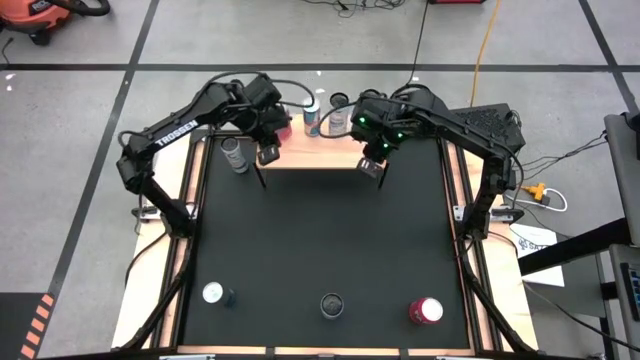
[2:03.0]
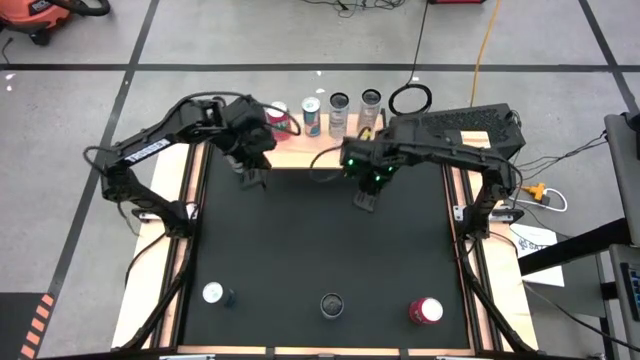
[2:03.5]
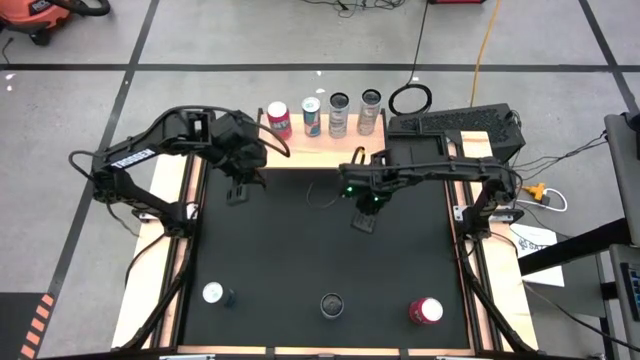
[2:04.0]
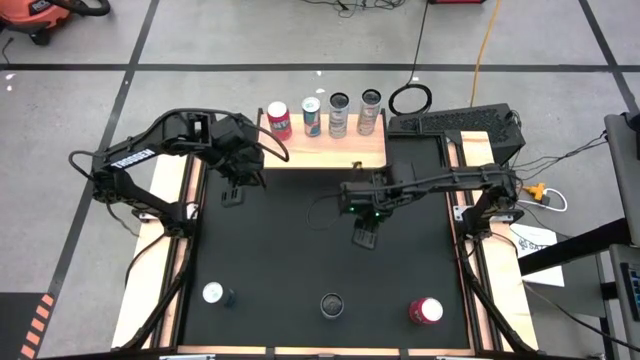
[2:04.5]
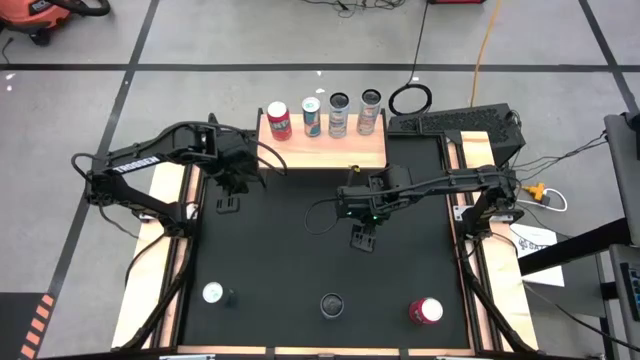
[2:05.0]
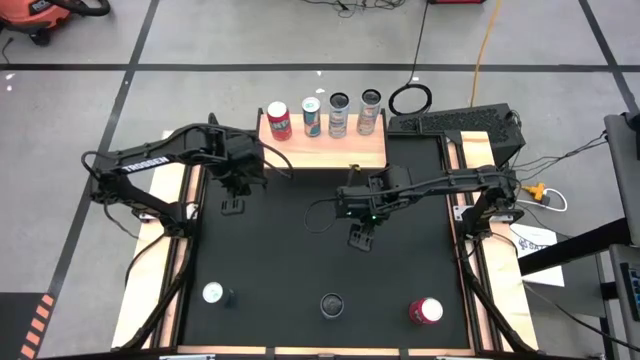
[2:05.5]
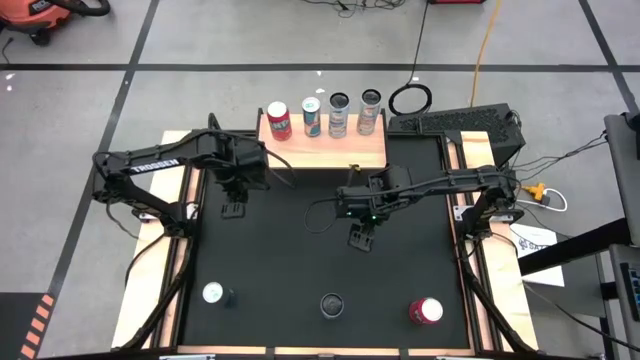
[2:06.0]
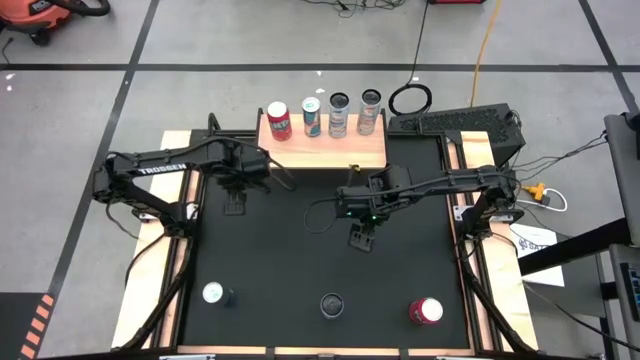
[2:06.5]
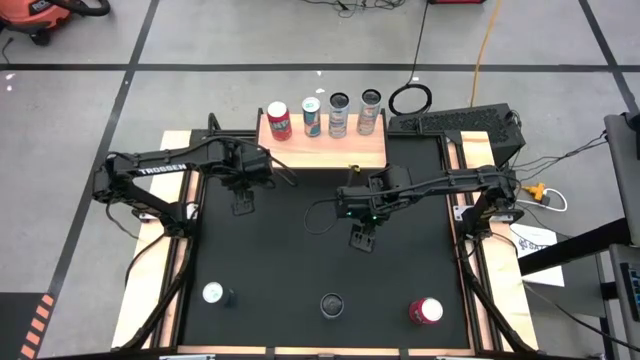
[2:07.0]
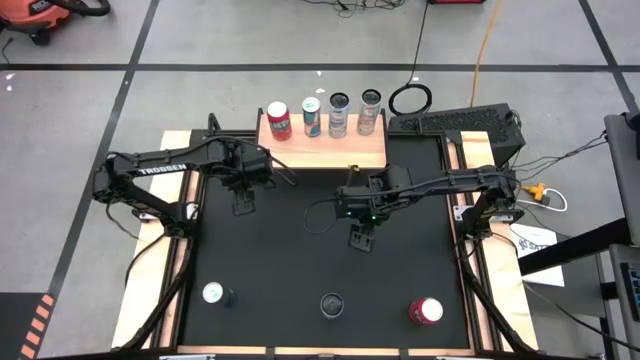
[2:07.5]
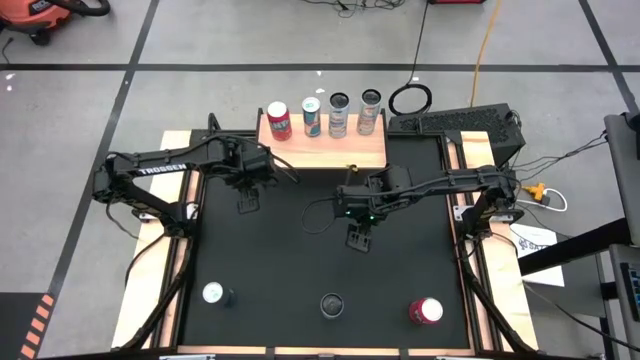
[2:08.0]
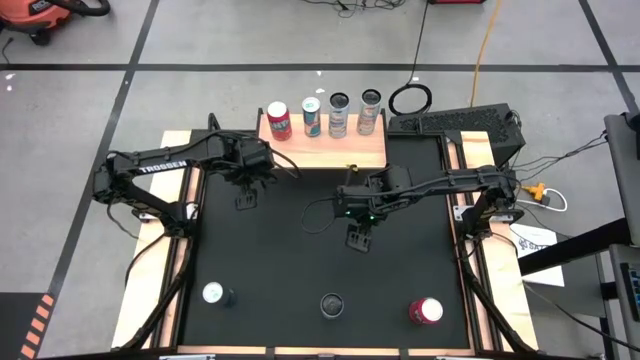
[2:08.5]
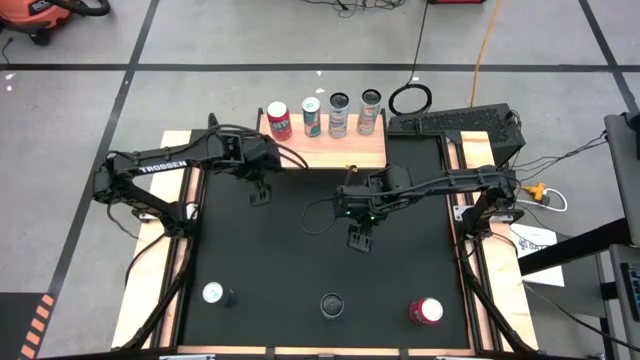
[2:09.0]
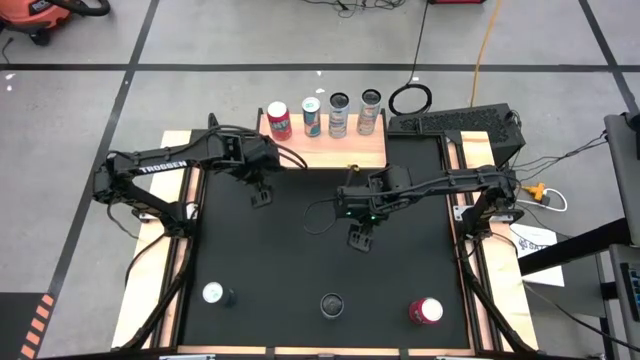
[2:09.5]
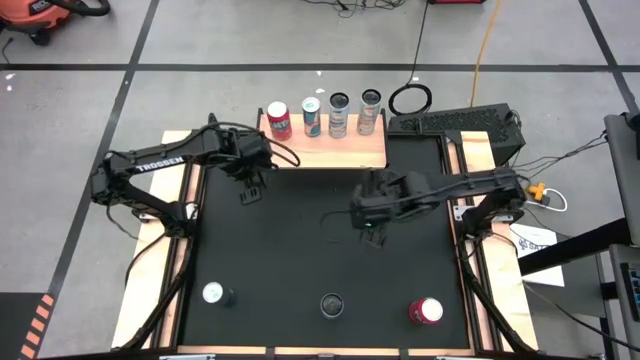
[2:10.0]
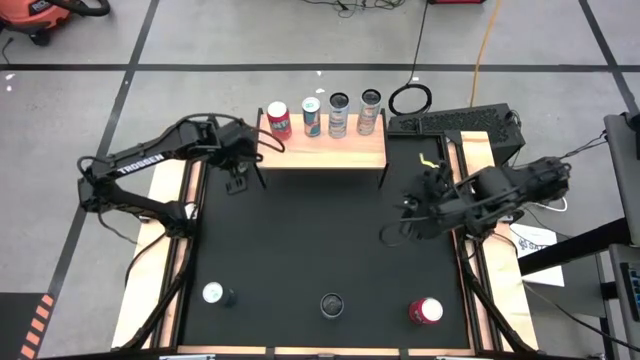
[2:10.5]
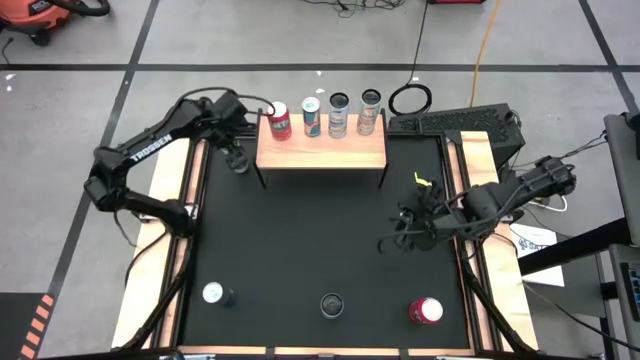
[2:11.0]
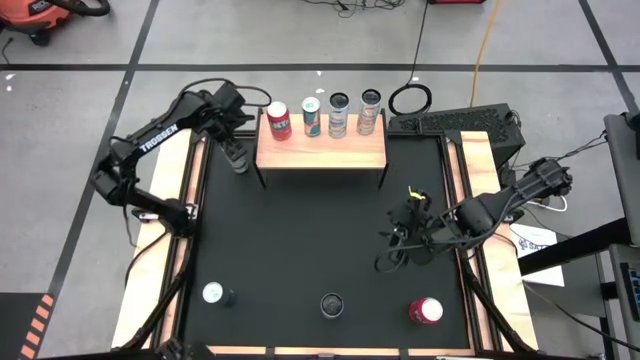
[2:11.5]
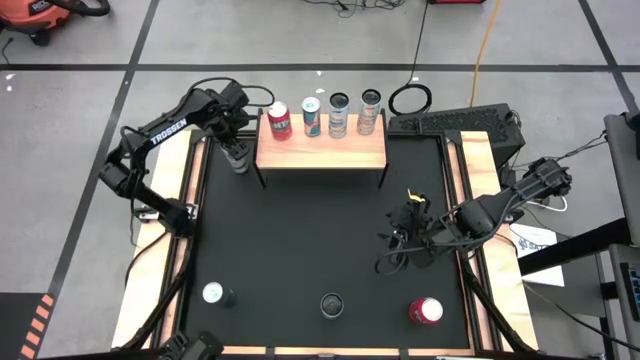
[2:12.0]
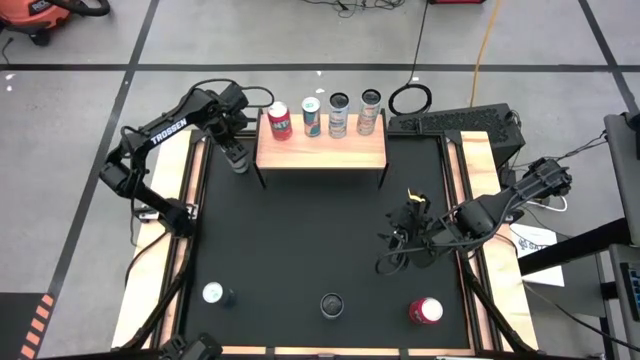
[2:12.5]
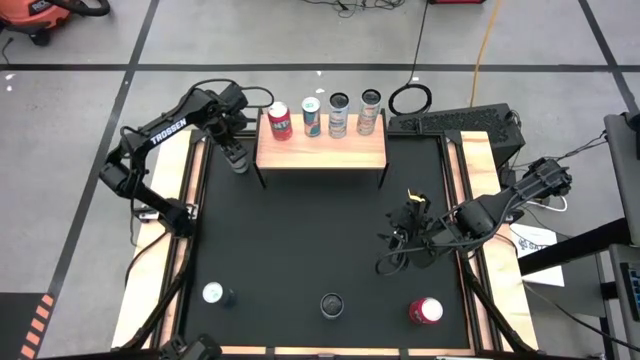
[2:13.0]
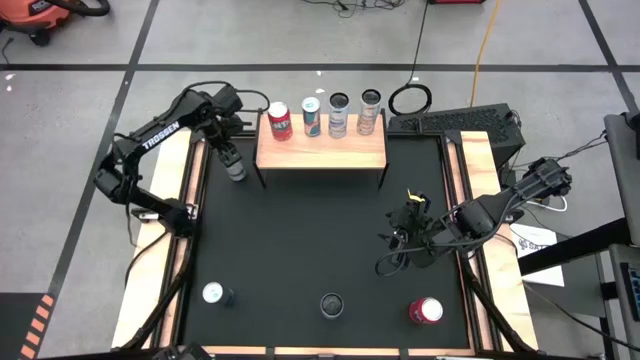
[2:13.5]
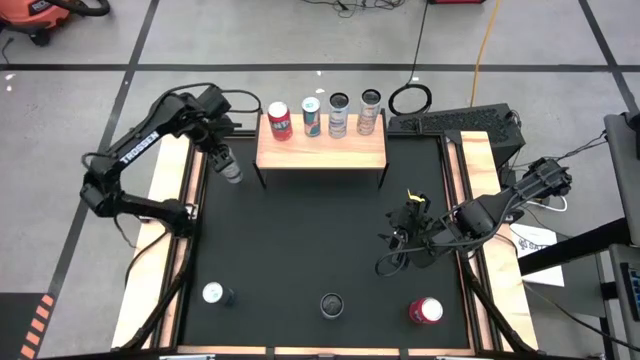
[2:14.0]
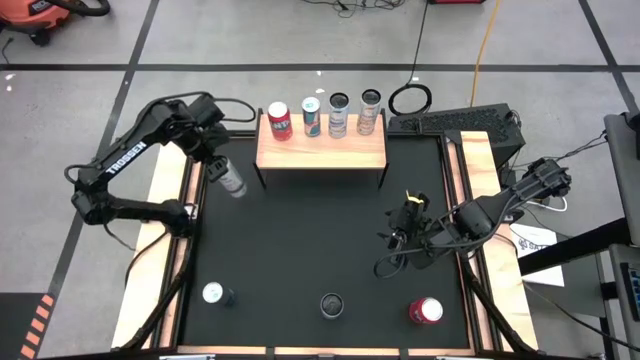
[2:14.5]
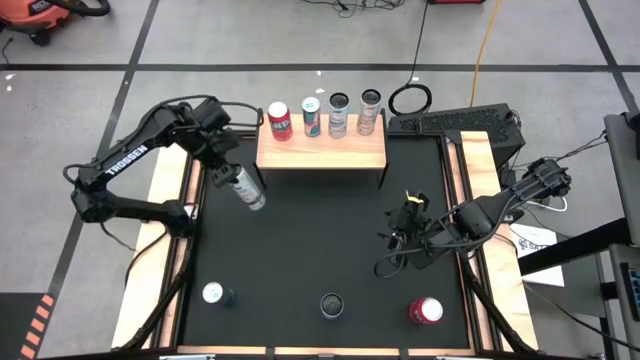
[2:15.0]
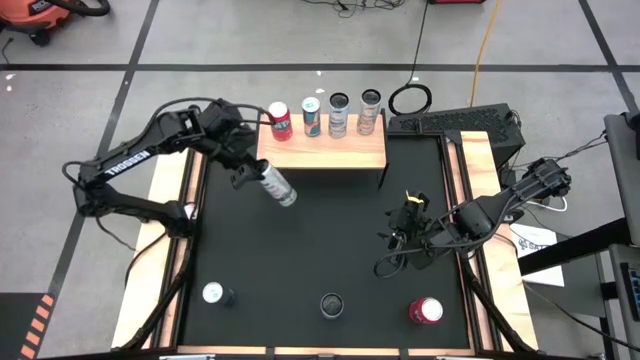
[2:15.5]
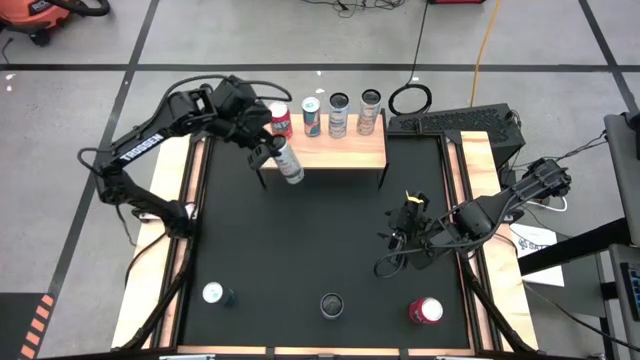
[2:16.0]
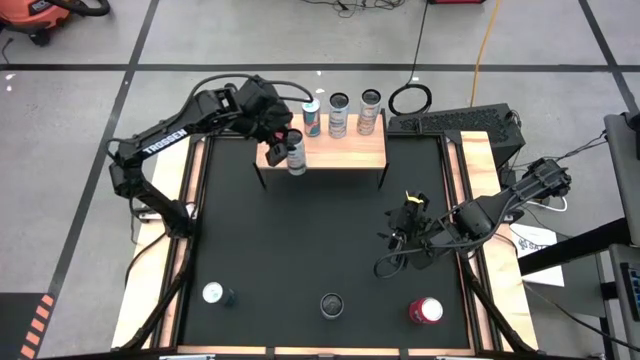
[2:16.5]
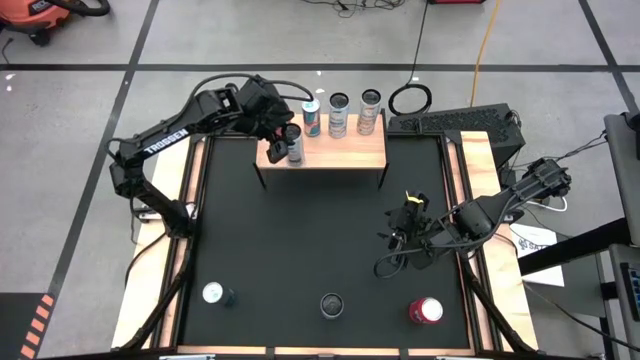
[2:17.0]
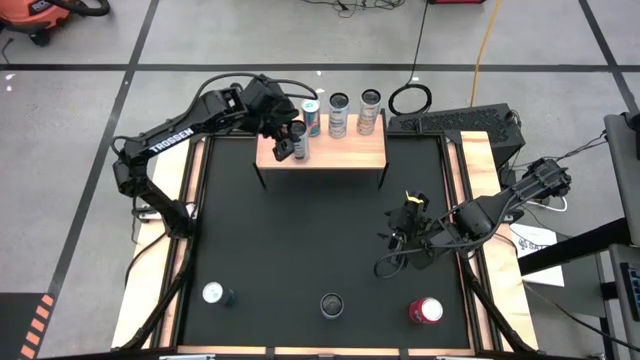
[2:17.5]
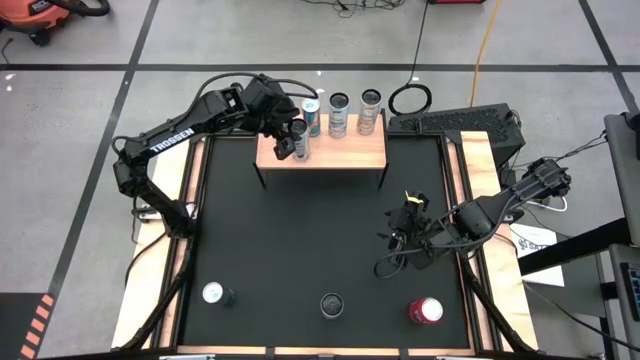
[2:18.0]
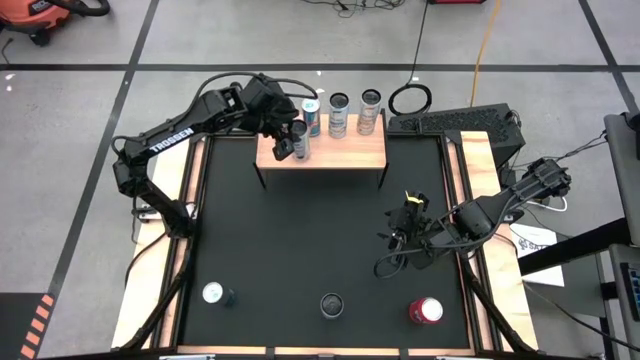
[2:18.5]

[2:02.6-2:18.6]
Task: Place canned beverage on shelf
Put the white-yellow soda can on the shelf aligned with the other white-yellow soda can

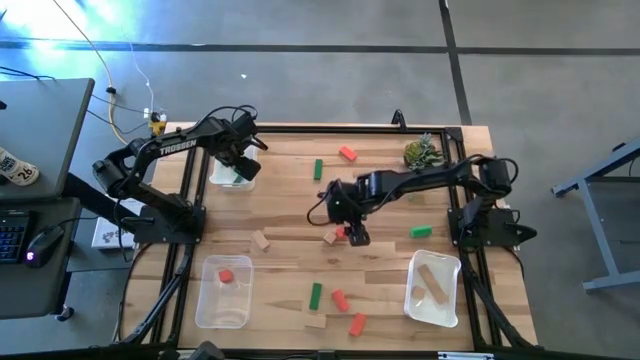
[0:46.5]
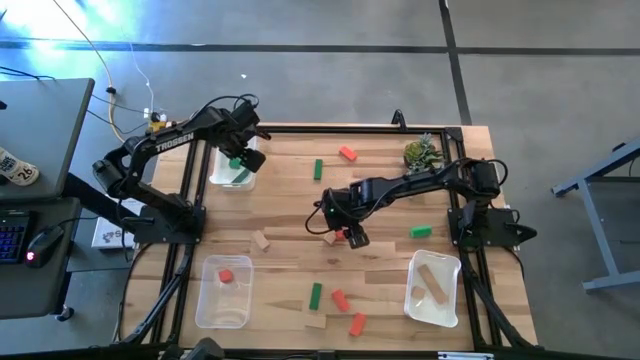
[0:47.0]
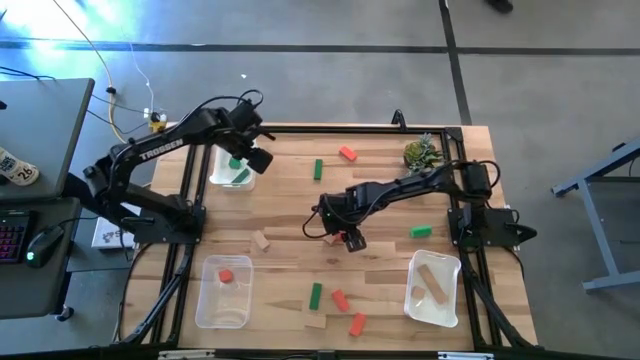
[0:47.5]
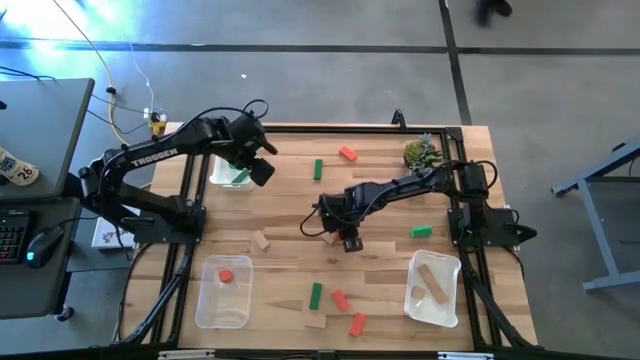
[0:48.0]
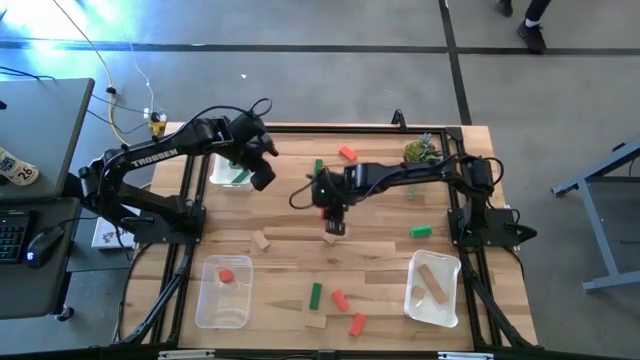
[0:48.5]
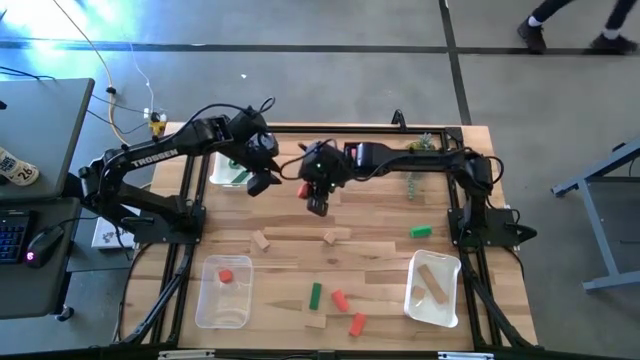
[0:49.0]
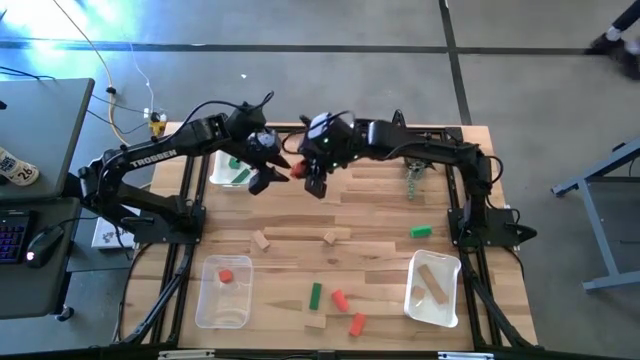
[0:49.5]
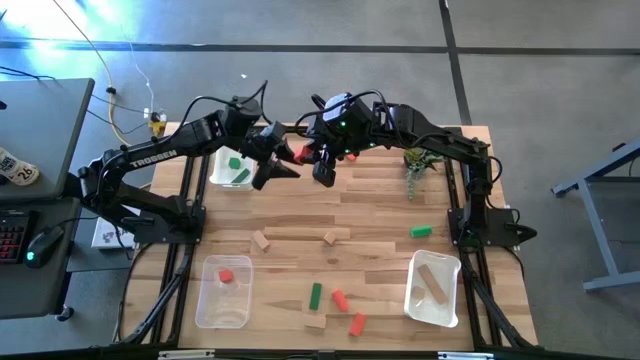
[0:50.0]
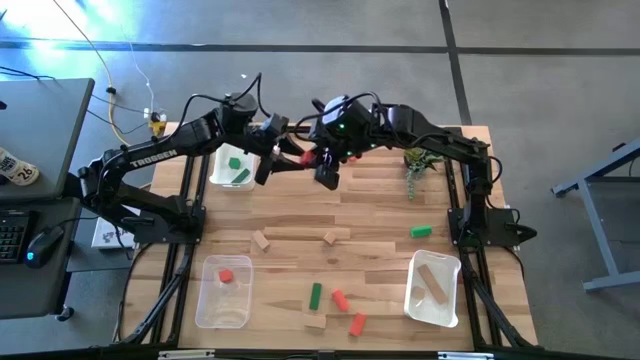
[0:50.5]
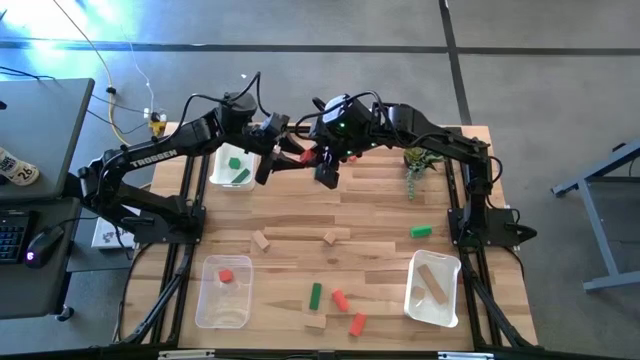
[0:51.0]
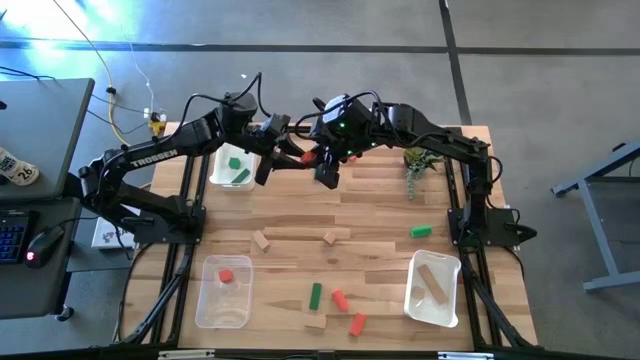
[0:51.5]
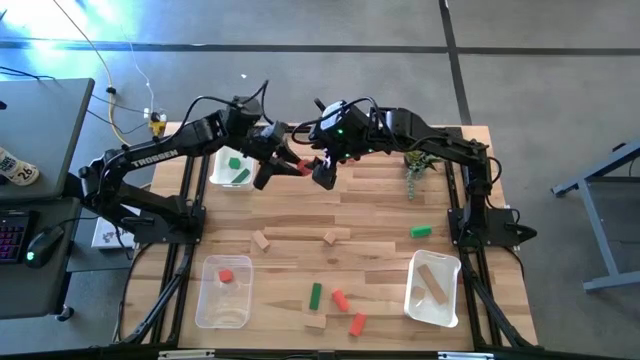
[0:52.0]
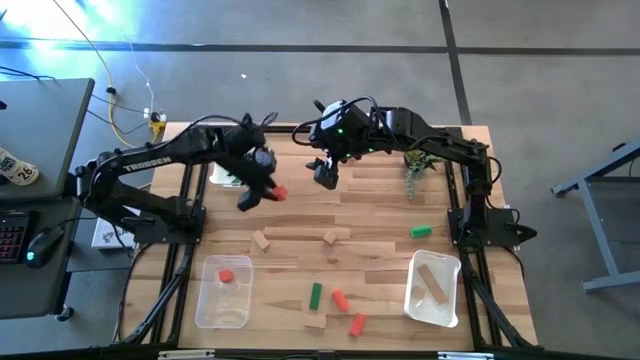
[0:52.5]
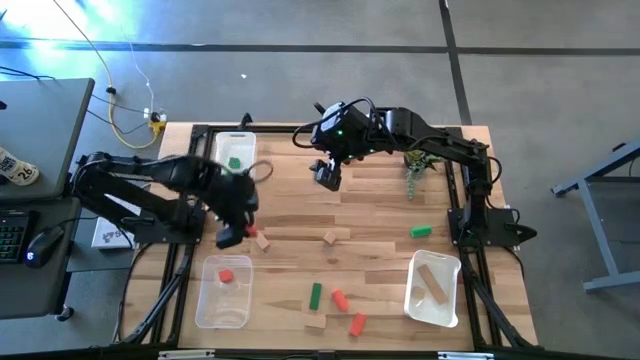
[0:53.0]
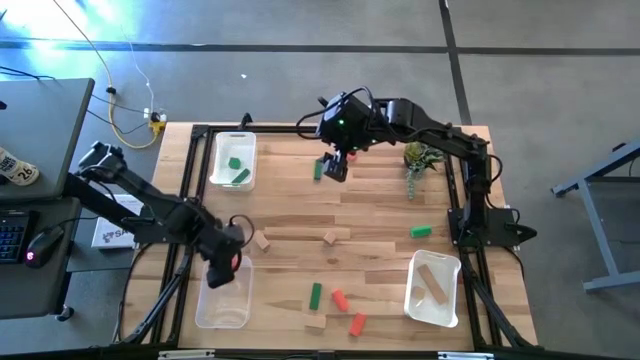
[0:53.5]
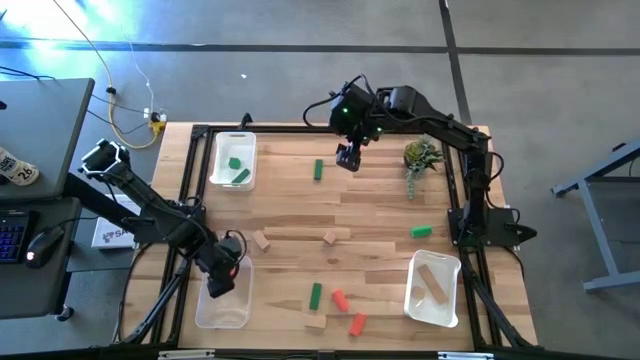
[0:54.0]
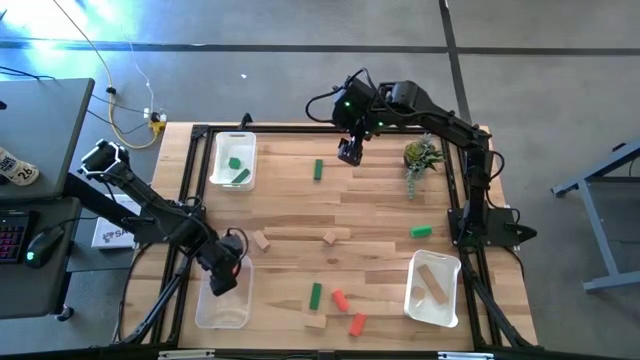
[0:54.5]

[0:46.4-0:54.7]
Task: Sort & place blocks by color
Put the orange block into the transparent bin
